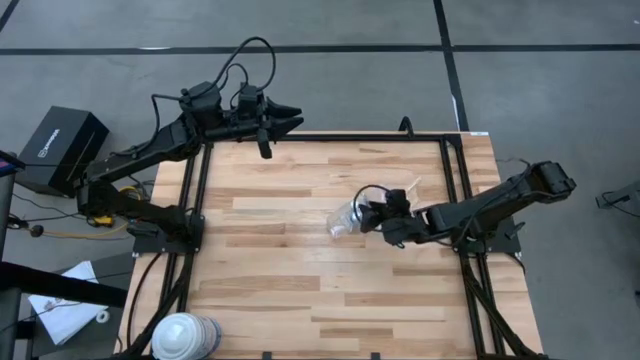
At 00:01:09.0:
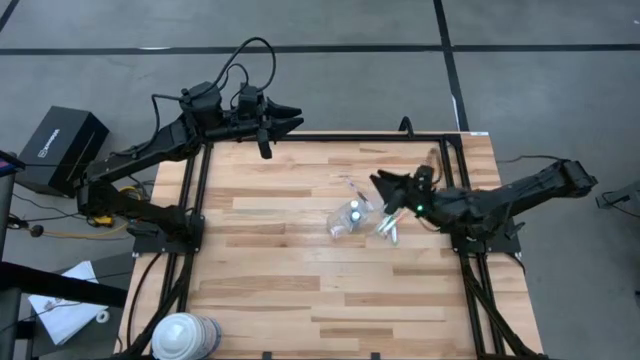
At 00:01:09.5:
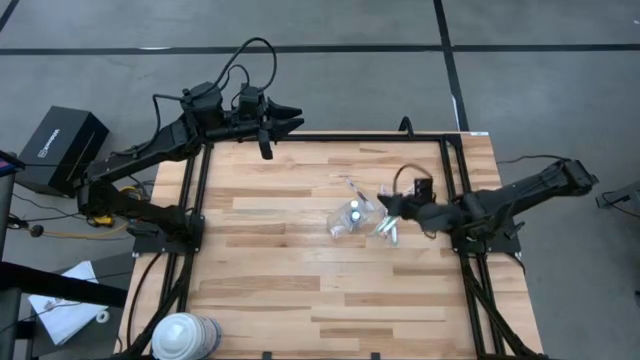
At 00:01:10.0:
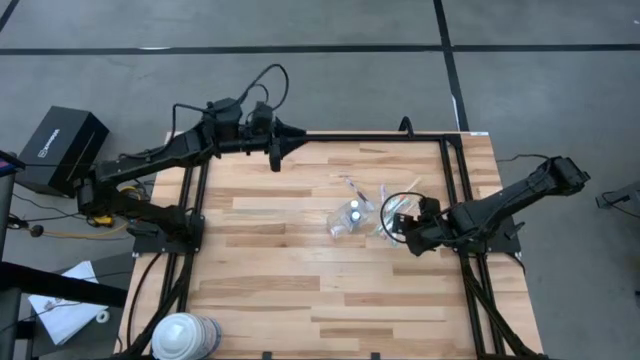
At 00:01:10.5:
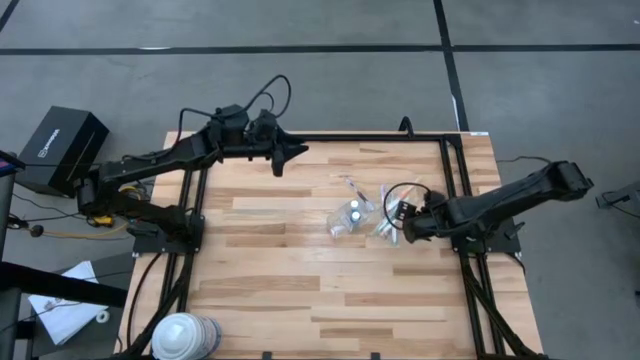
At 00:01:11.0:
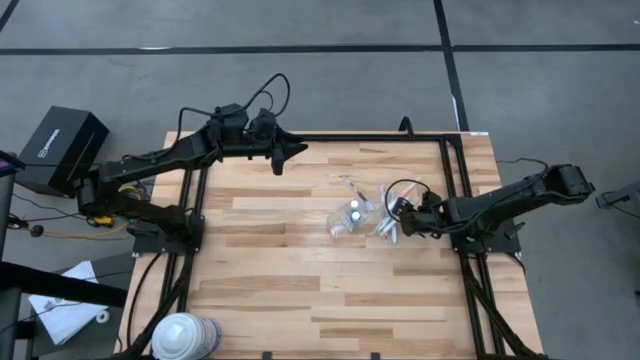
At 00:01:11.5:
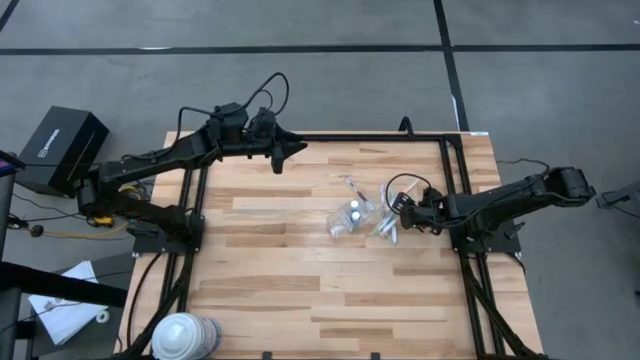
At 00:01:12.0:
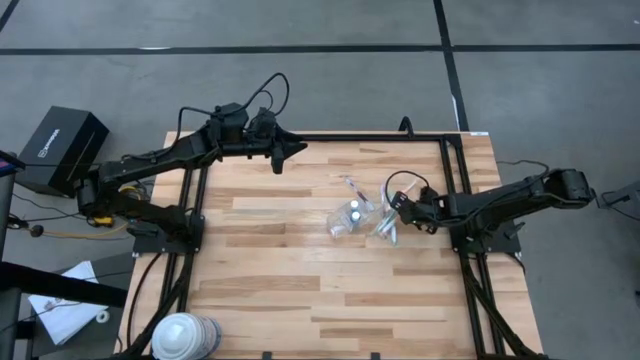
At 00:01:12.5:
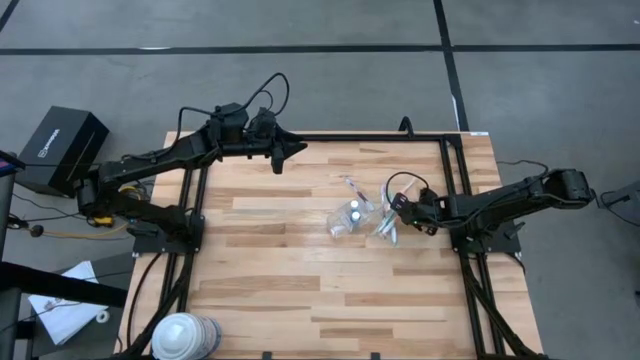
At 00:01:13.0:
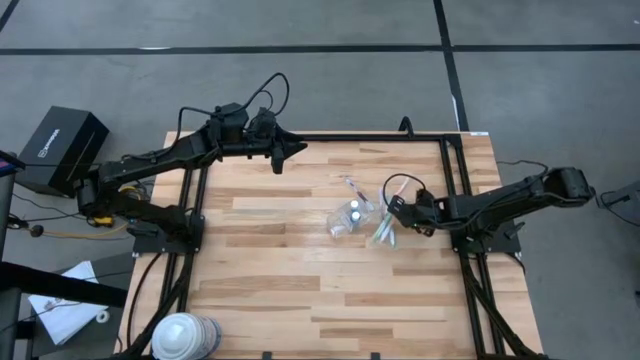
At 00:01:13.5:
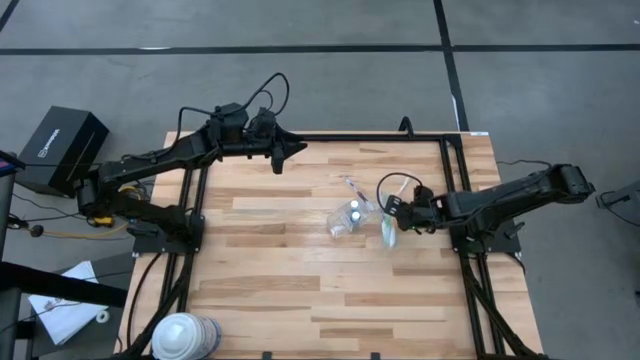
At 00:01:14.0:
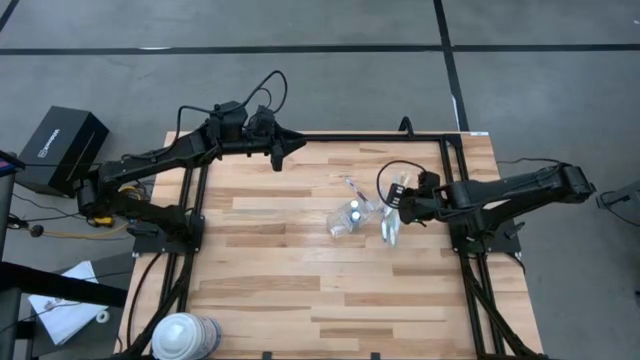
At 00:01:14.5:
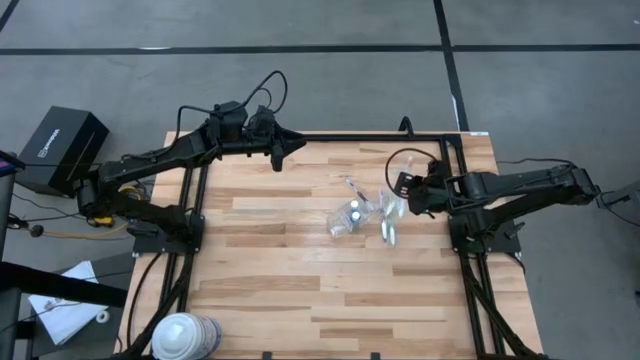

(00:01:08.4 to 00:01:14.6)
Task: Pick & Place toothbrushing station
Put the orange toothbrush into the transparent organizer

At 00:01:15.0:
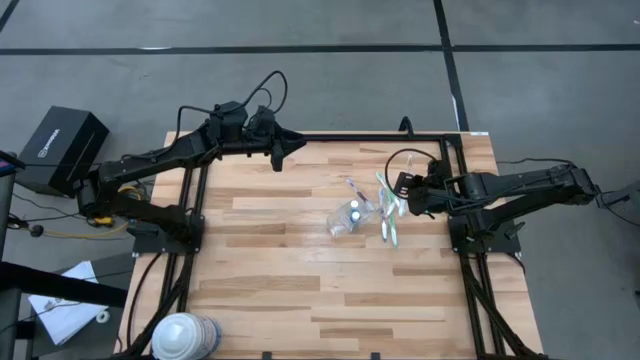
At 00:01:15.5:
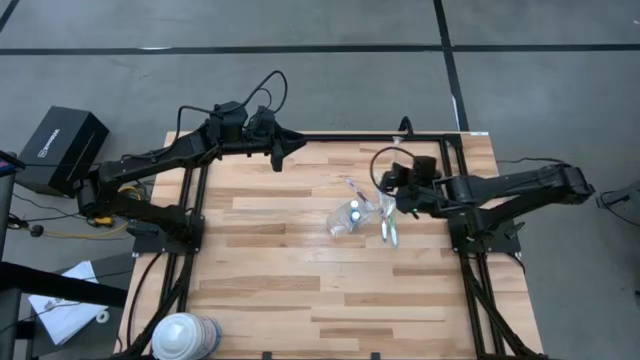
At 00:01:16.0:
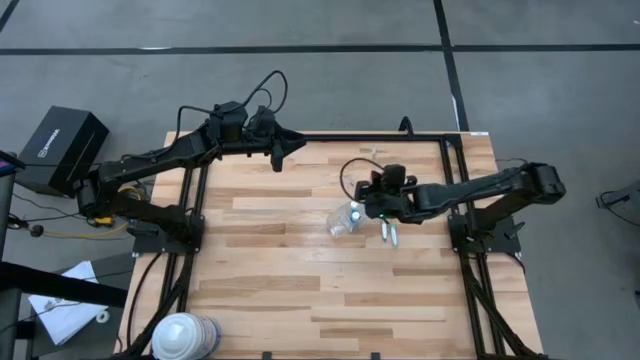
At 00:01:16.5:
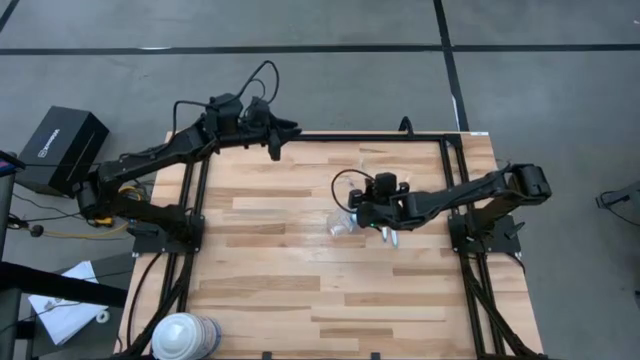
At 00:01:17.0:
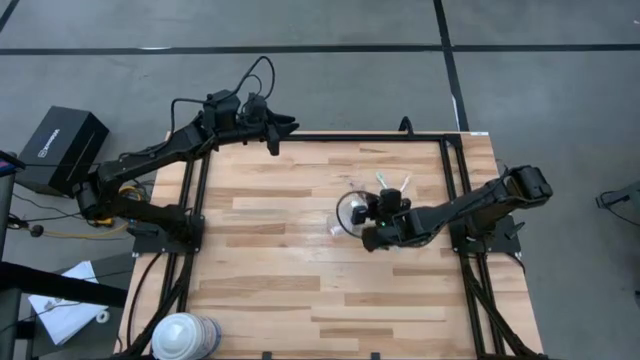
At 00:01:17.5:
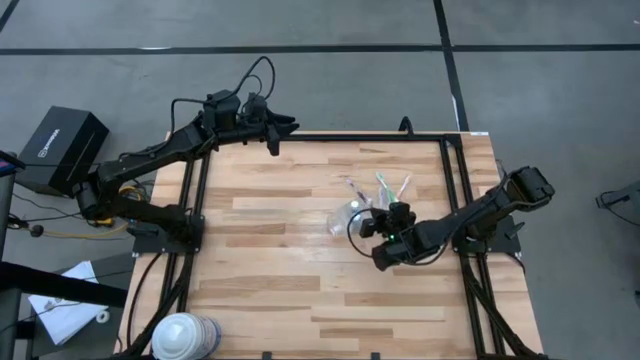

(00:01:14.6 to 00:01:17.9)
Put the orange toothbrush into the transparent organizer

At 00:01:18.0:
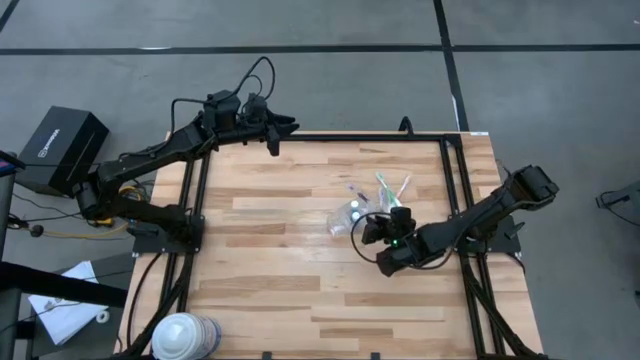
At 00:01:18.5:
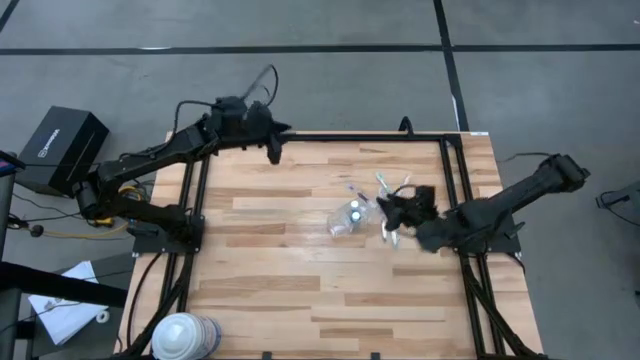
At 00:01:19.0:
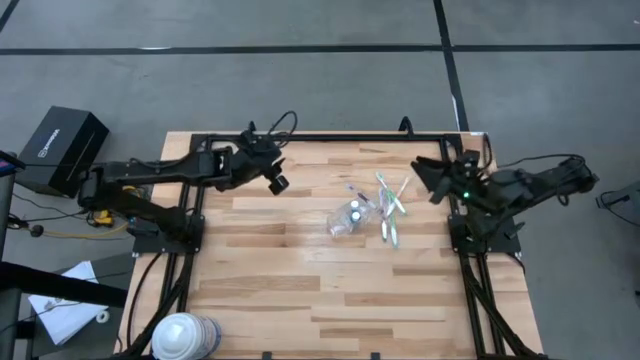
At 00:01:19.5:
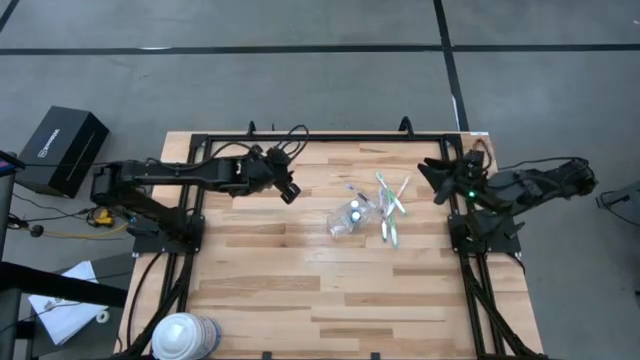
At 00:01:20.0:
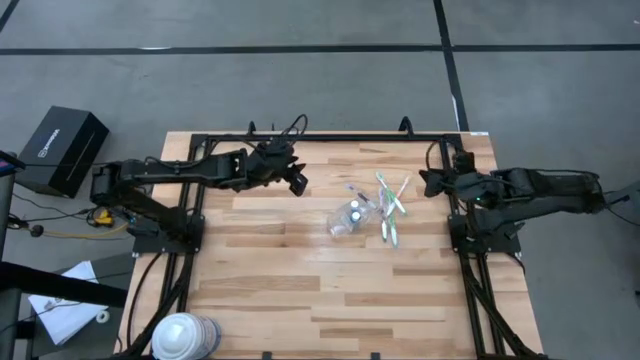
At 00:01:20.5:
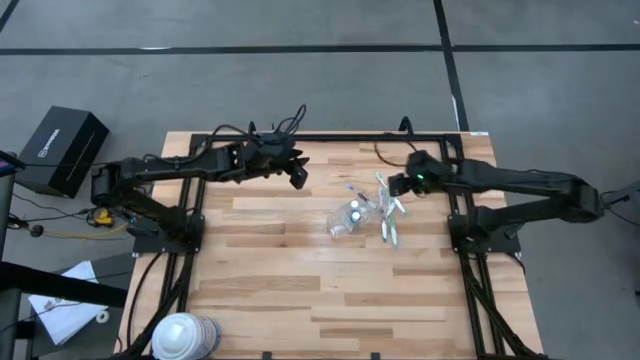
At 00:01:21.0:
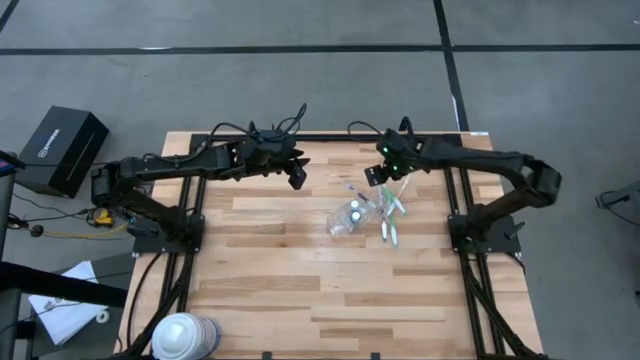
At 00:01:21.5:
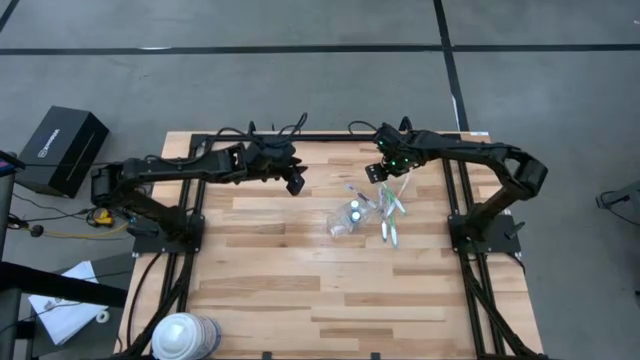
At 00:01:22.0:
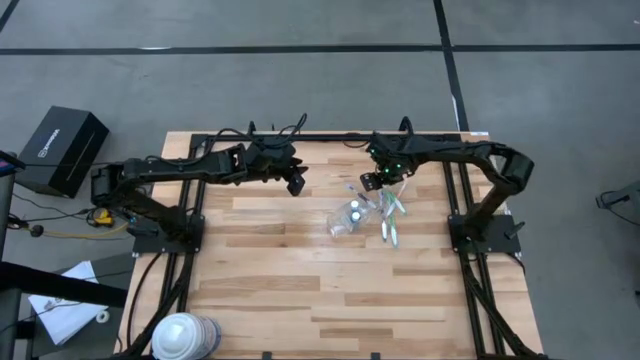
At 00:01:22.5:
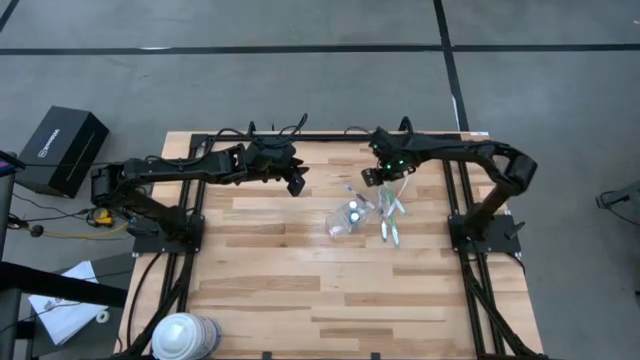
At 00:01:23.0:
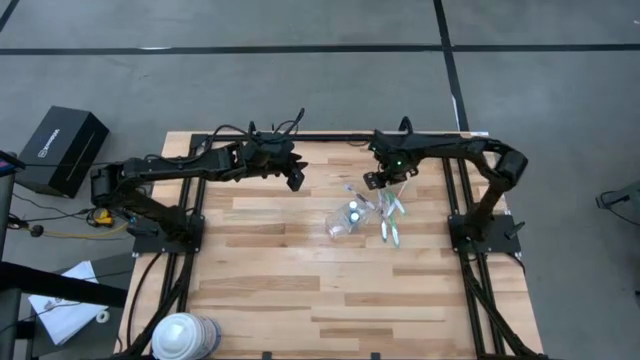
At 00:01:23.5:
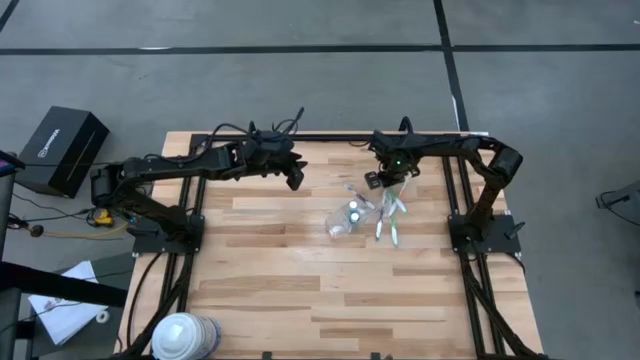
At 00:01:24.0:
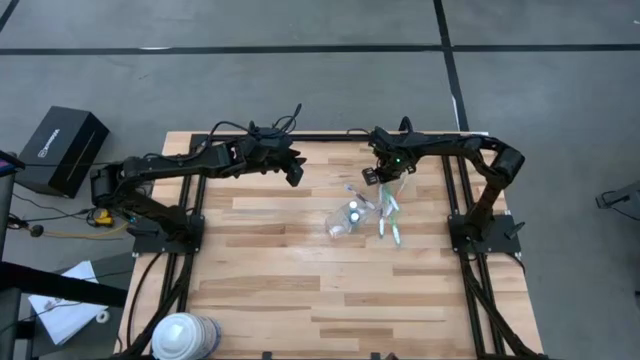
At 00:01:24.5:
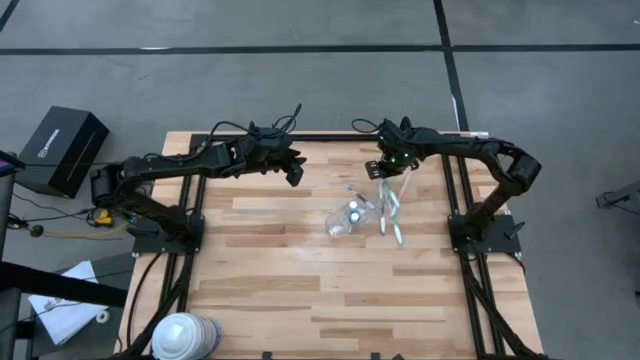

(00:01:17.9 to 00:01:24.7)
Put the green toothbrush into the transparent organizer

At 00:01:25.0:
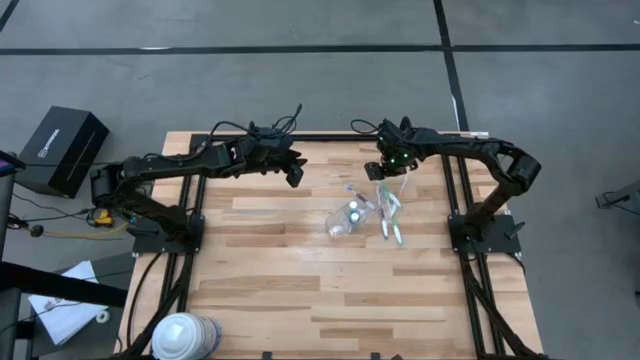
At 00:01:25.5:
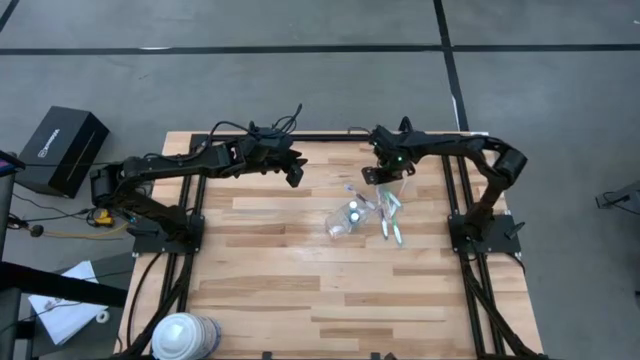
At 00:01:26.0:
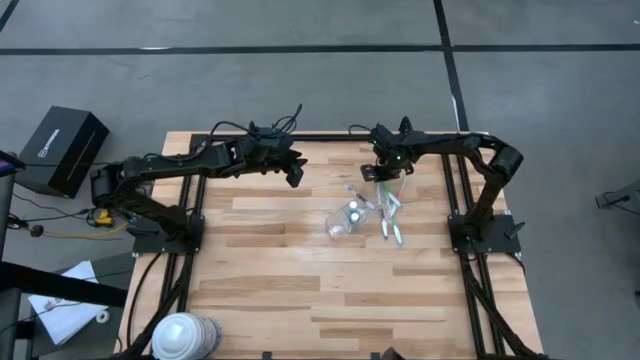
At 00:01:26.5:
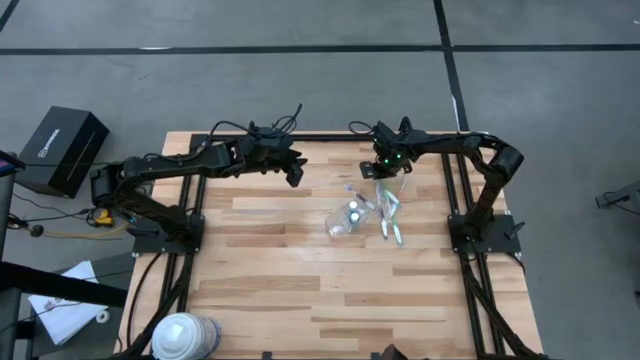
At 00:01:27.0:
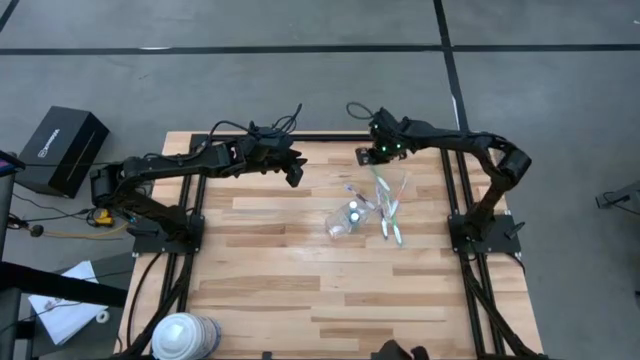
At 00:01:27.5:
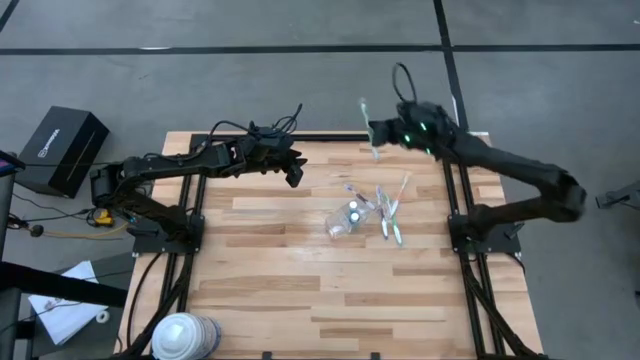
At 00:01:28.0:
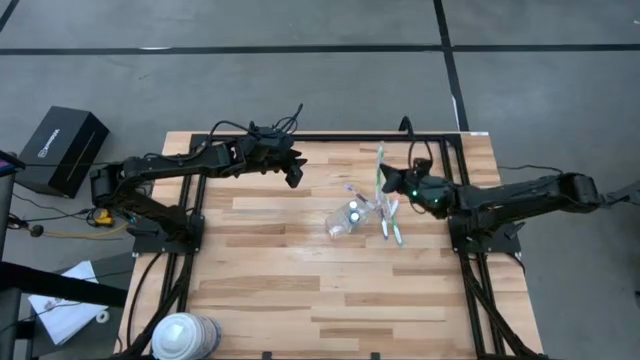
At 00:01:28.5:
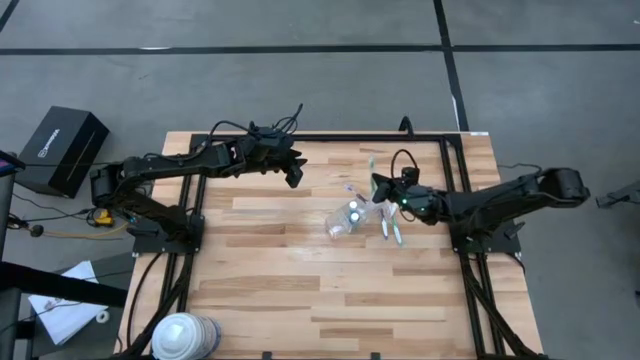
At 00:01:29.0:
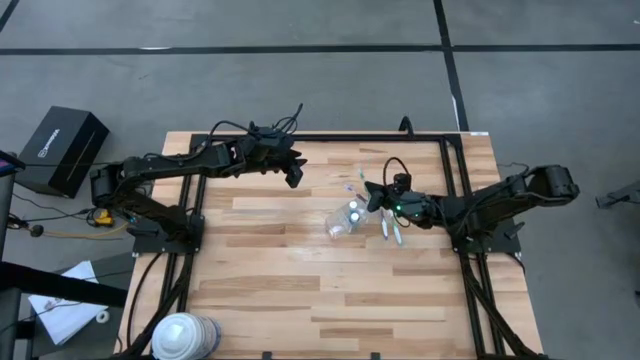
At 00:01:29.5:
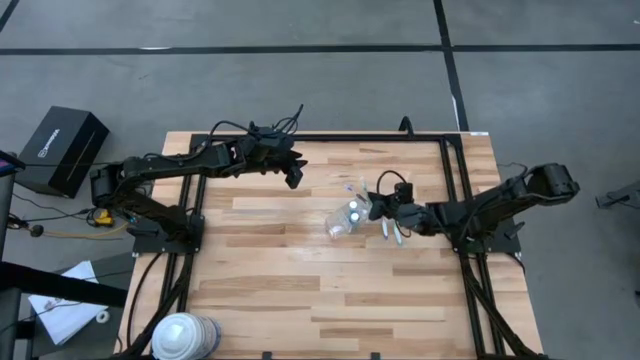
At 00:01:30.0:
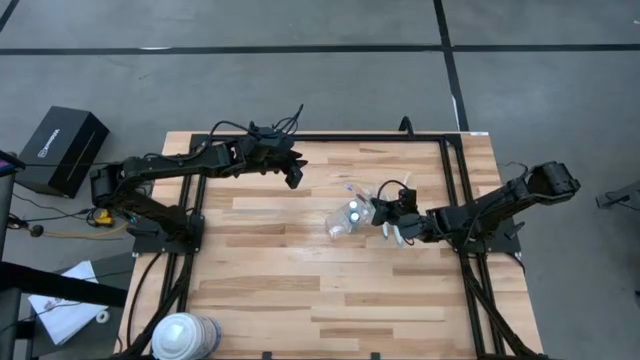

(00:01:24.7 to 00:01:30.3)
Put the green toothbrush into the transparent organizer
